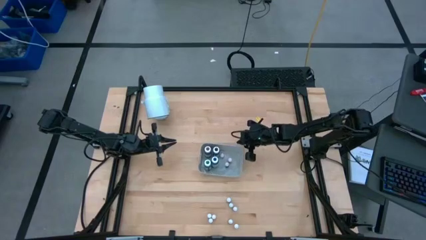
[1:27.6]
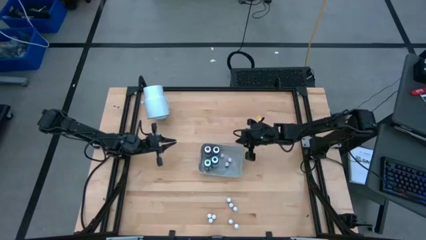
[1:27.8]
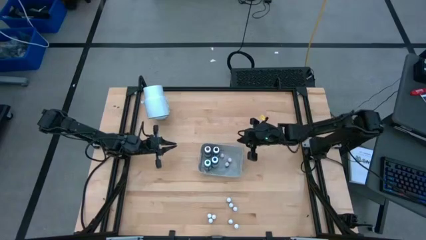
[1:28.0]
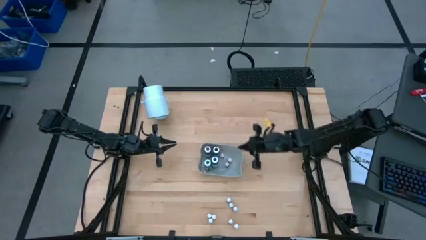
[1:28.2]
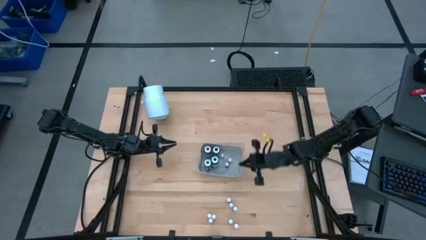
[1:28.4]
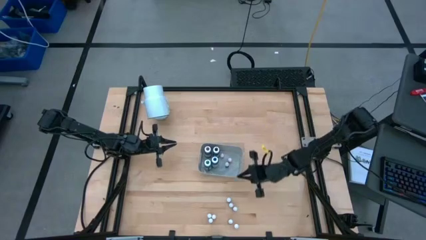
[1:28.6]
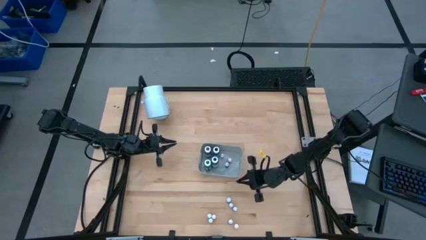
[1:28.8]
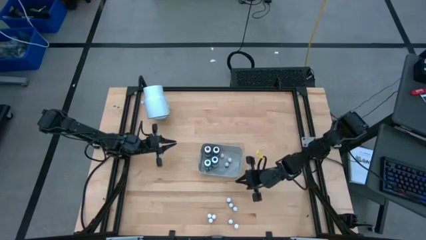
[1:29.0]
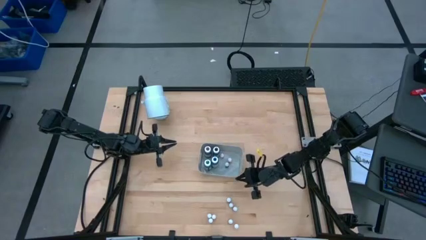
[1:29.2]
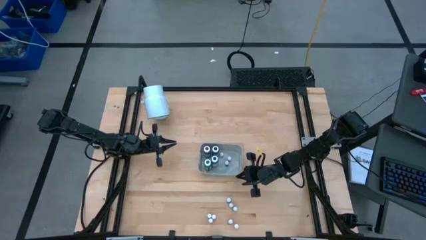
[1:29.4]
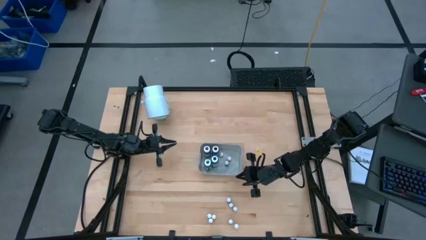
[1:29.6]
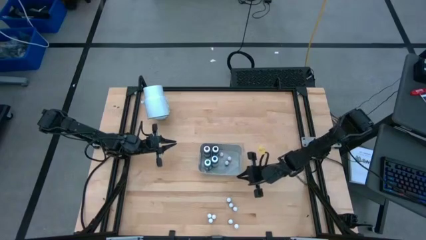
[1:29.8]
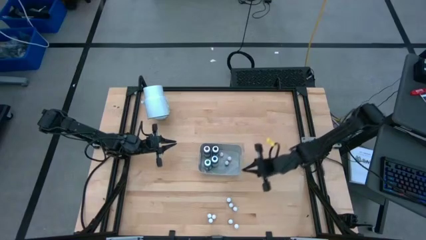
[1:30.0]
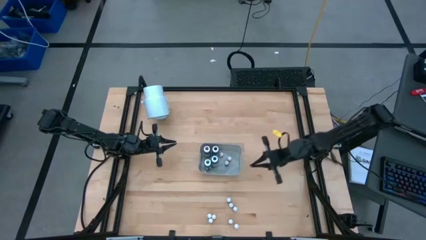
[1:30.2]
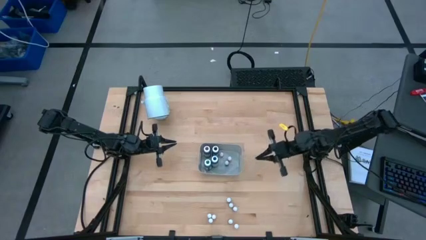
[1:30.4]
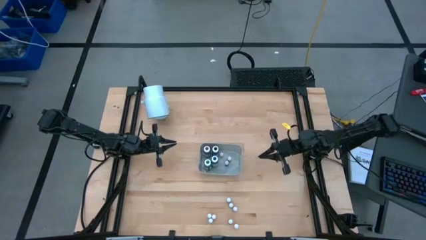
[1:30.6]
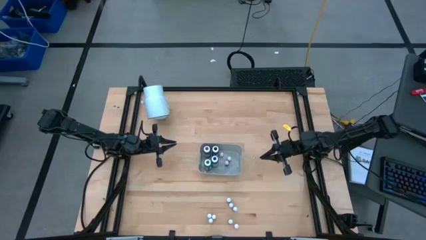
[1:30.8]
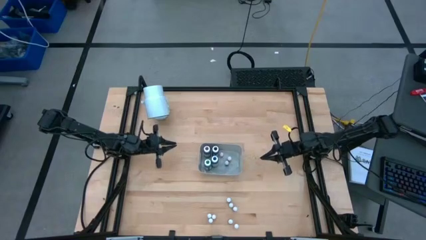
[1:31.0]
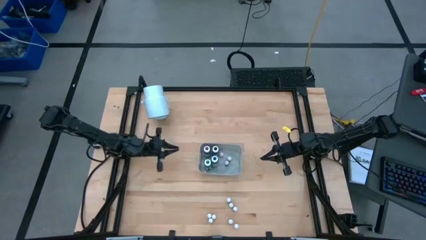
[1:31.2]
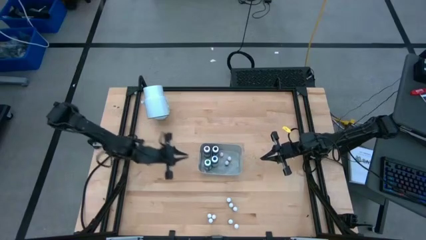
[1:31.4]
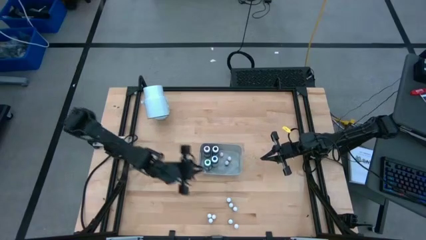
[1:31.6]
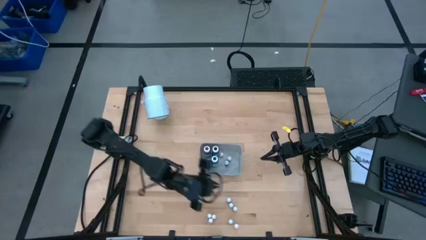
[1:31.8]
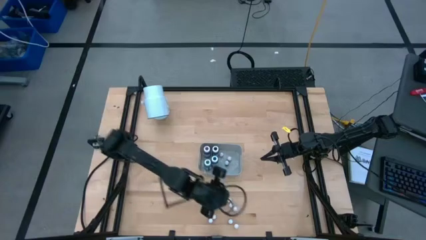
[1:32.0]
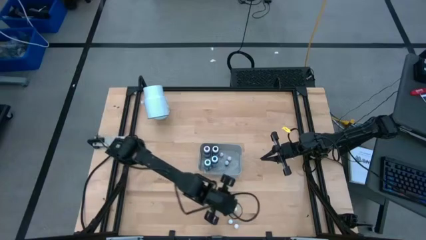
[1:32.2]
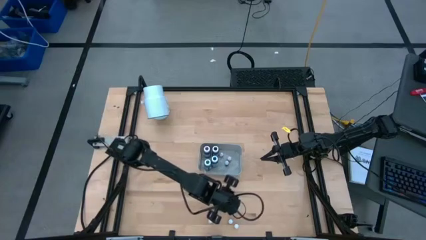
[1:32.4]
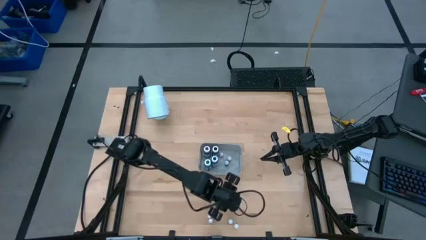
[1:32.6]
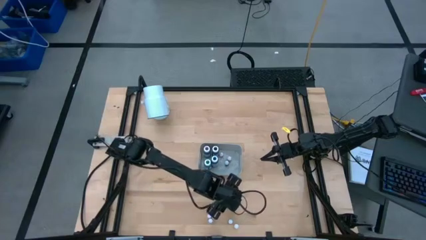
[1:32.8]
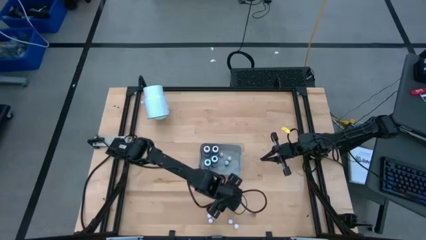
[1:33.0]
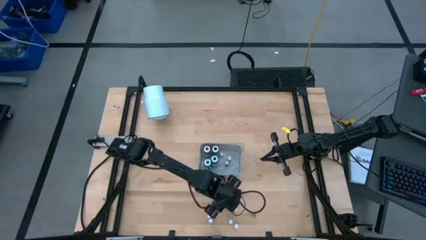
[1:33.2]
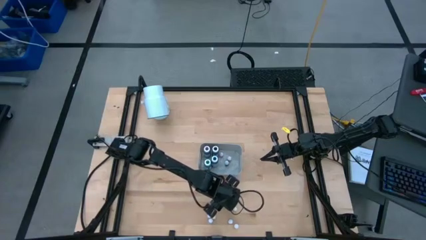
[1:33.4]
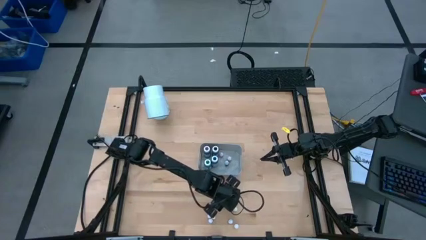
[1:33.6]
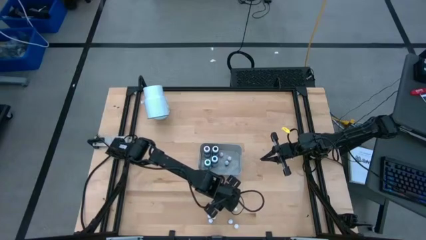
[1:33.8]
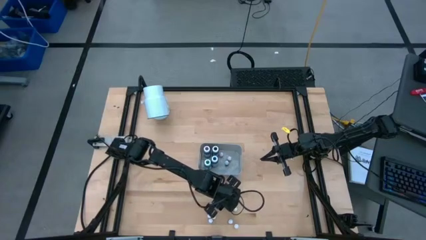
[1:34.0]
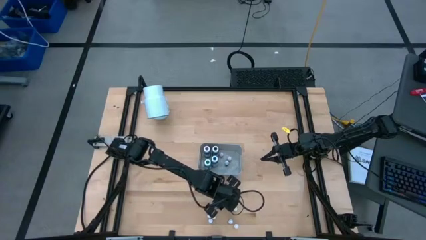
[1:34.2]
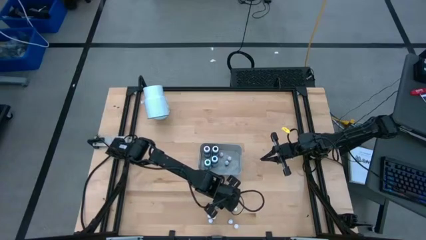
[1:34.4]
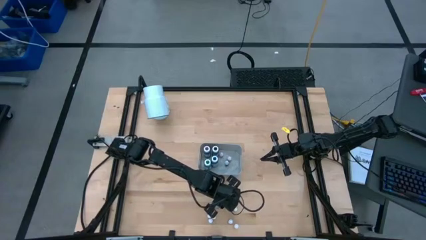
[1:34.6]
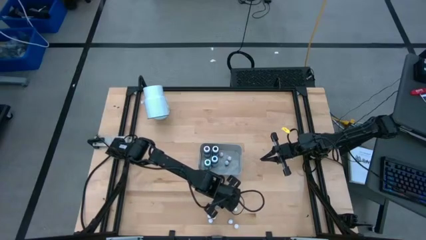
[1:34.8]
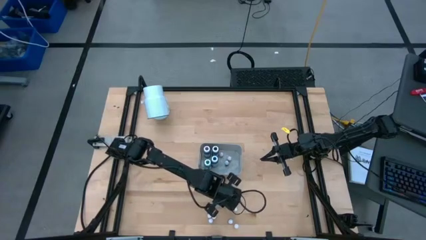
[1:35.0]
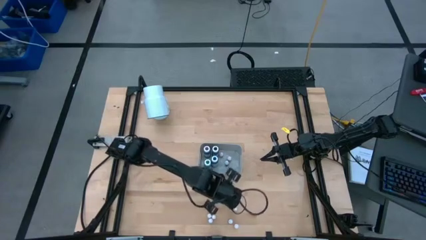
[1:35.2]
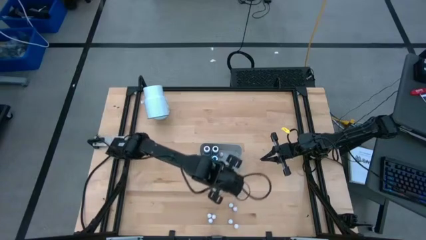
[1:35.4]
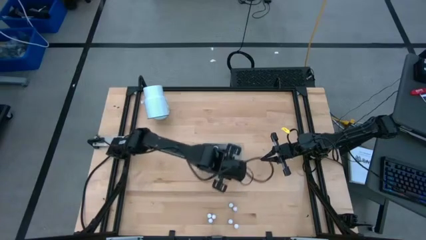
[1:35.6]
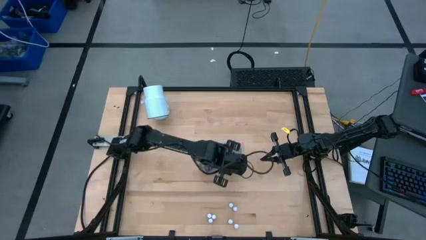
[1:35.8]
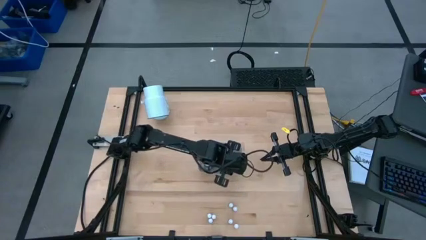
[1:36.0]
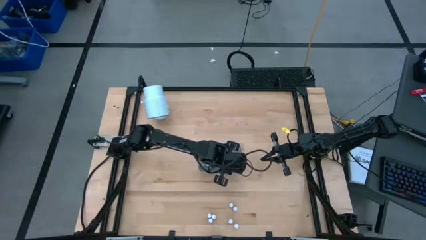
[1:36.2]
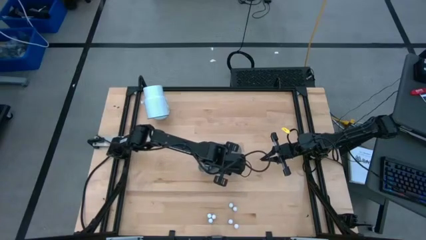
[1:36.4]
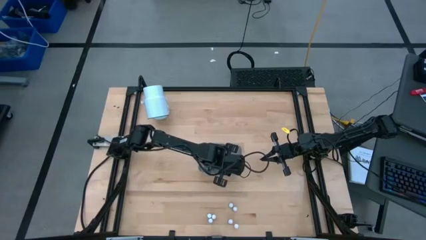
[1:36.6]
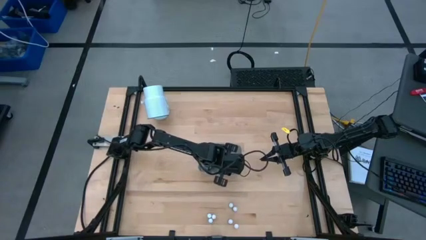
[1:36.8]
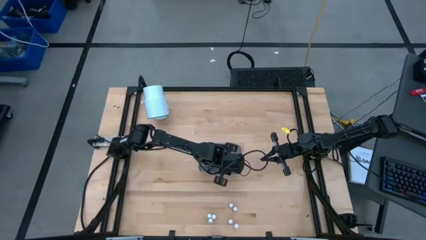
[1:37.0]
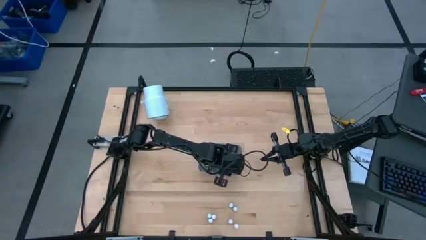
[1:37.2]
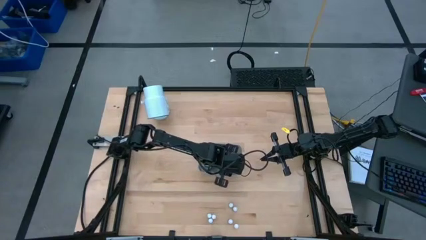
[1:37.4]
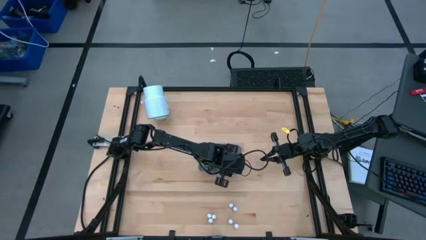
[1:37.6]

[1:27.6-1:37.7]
Task: Pick & Place food coloring
Put the small purple food coloring bottle into the bin

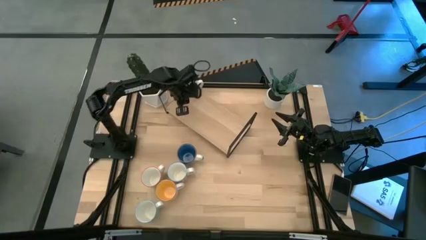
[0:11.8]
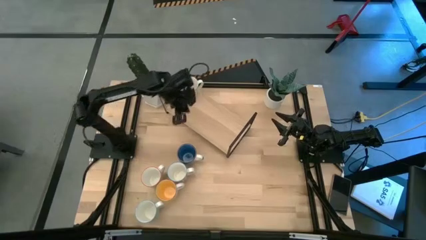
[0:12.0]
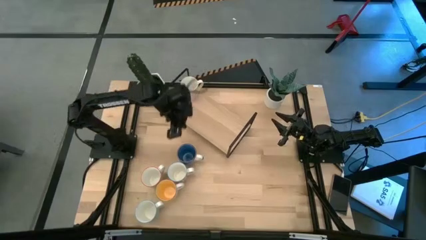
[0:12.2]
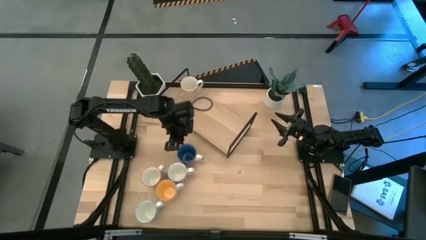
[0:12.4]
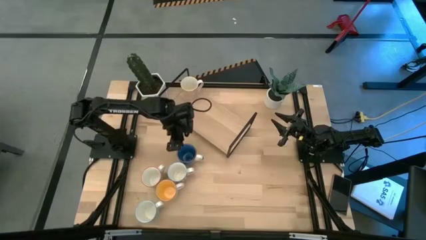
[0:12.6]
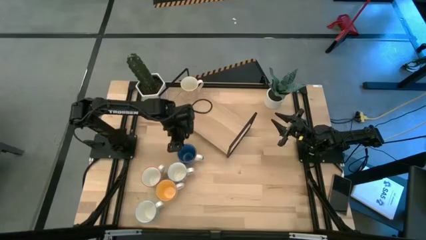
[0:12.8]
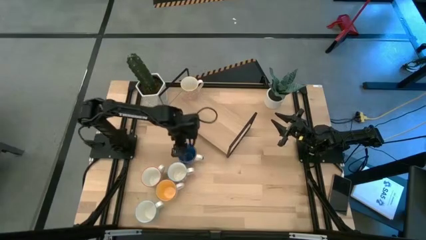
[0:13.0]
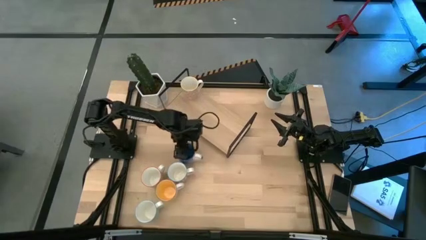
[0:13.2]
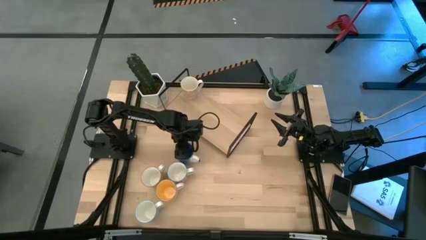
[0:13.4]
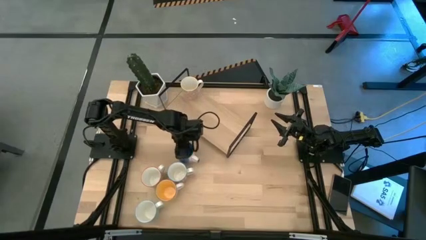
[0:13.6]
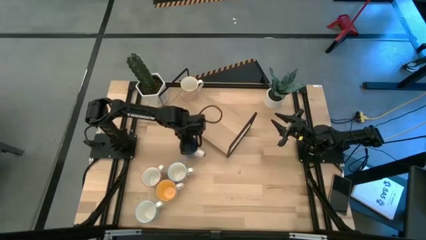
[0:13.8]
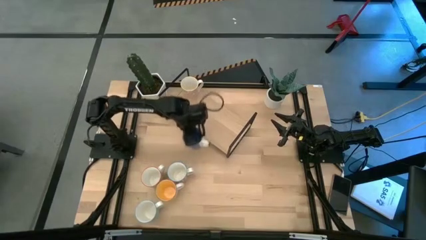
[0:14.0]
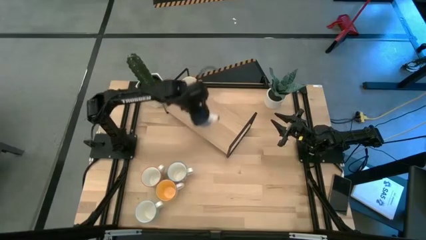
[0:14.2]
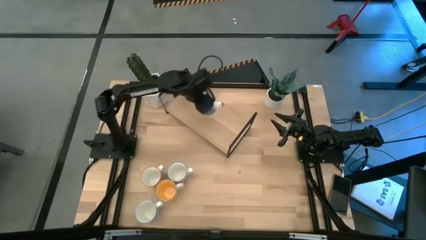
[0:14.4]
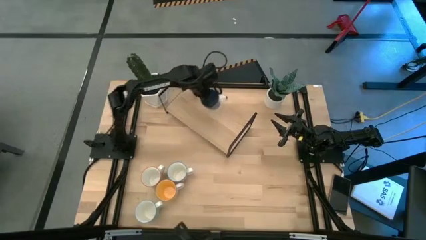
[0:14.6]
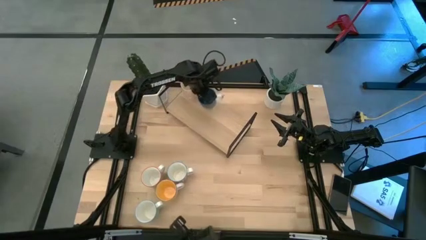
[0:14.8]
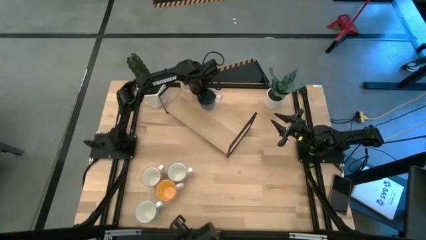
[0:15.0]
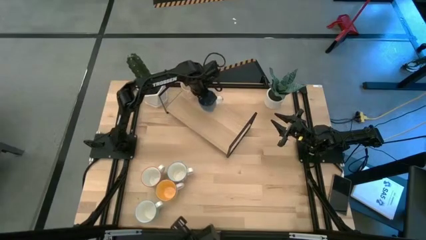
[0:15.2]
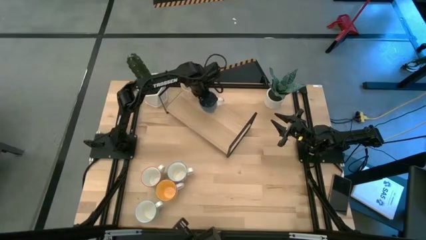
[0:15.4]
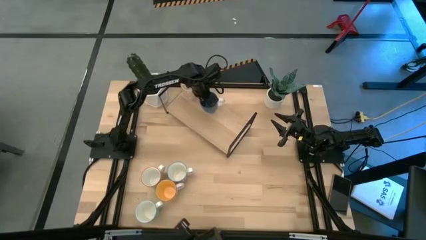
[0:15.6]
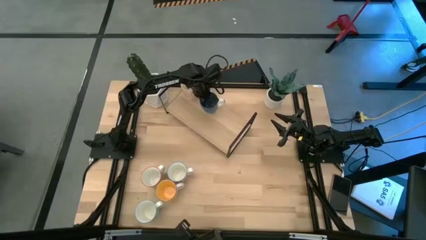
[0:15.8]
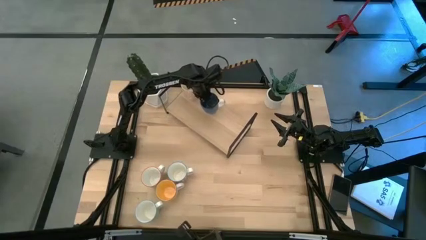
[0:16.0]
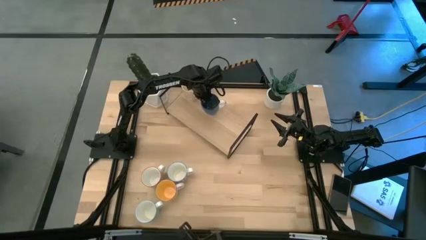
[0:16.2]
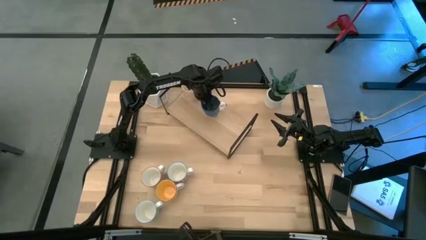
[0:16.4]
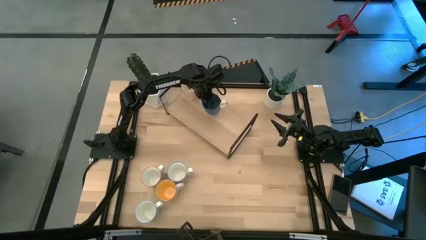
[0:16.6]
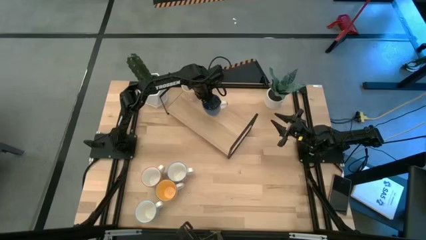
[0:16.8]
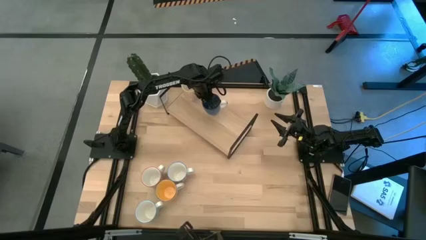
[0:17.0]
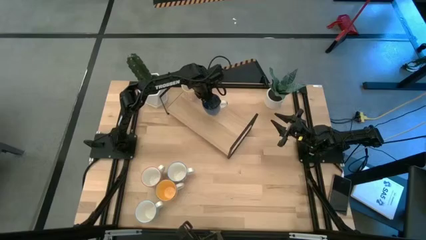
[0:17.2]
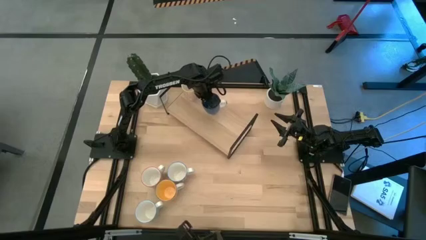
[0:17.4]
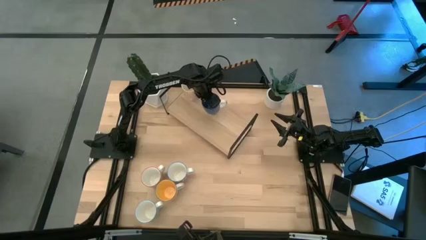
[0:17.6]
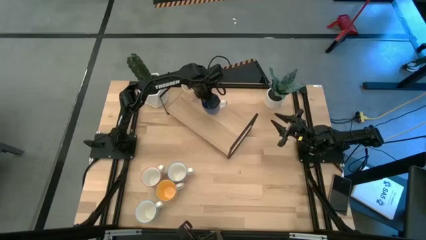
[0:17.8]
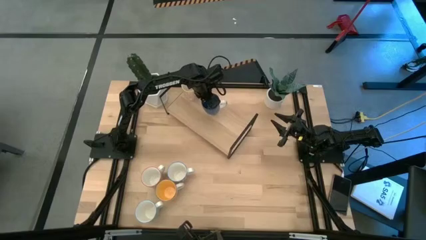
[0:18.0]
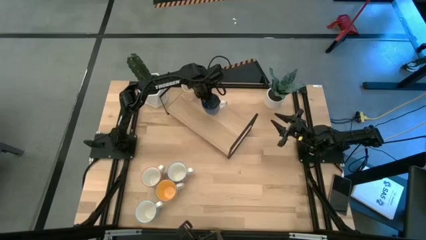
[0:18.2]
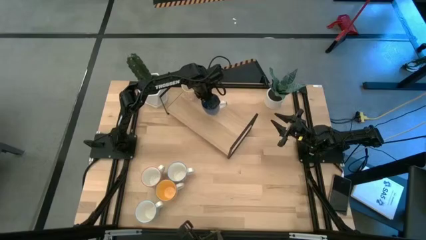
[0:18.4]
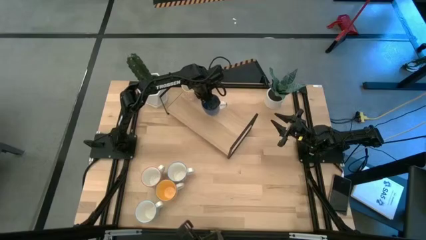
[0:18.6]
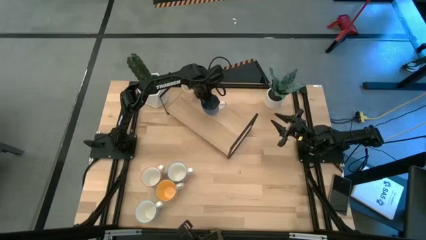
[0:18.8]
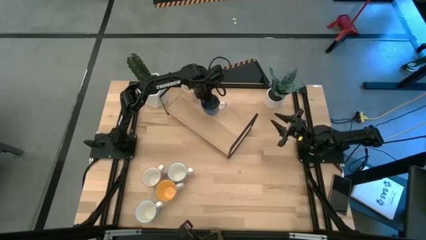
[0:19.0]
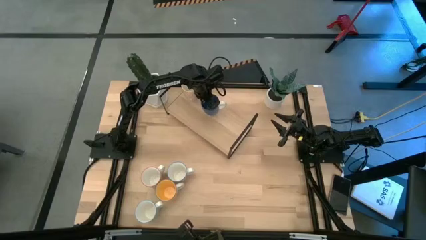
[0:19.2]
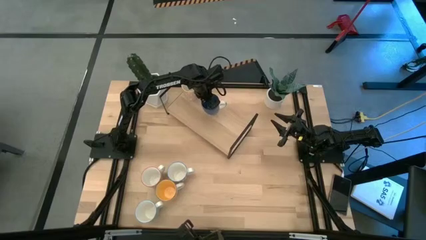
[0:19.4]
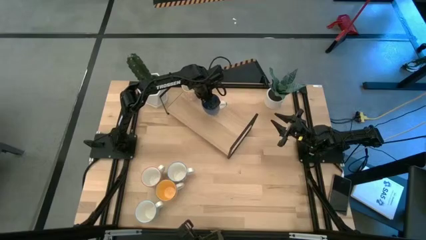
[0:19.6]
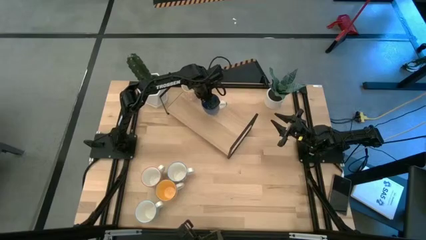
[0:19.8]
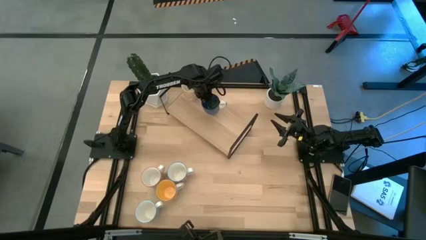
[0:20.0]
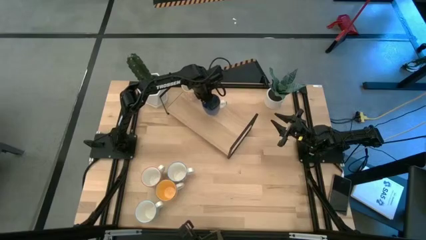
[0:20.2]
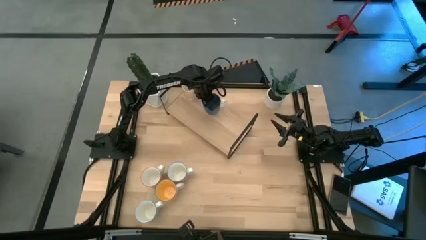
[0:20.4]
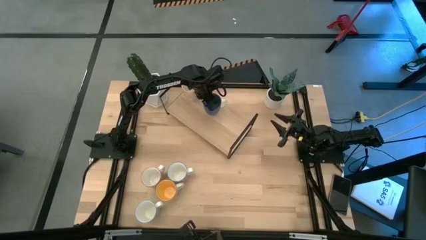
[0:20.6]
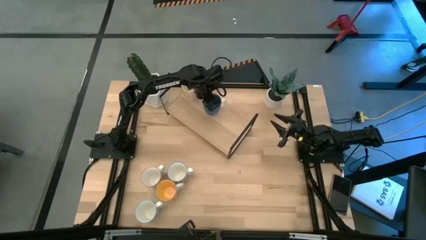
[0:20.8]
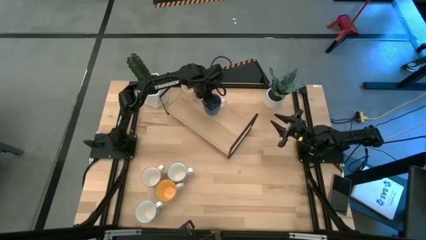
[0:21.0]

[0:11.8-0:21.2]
Task: Place coffee mugs
Put the blue mug on the shelf
